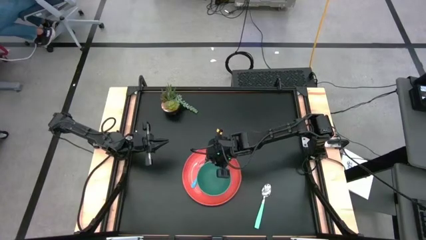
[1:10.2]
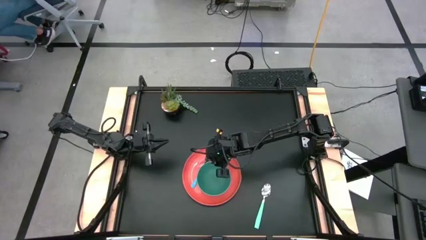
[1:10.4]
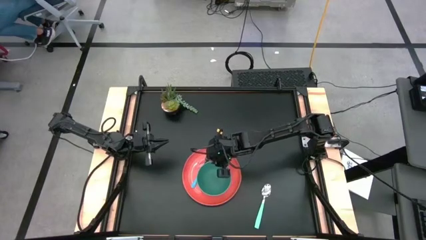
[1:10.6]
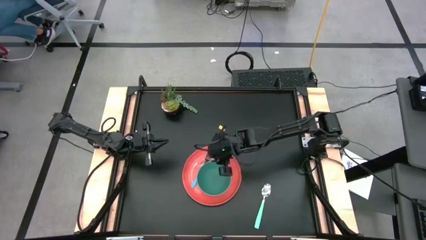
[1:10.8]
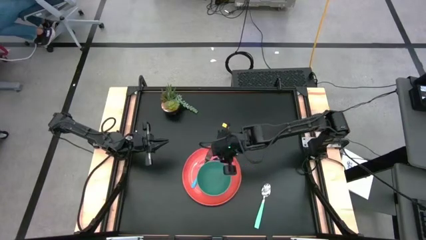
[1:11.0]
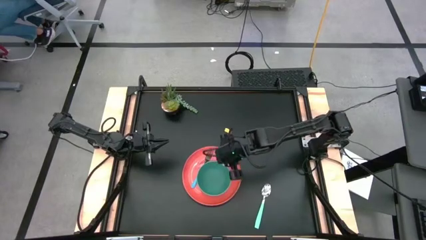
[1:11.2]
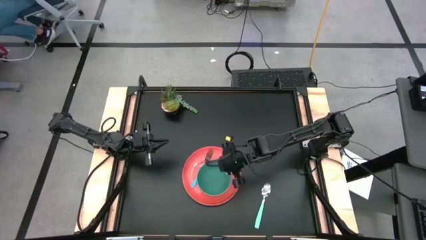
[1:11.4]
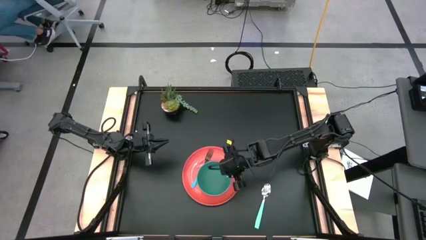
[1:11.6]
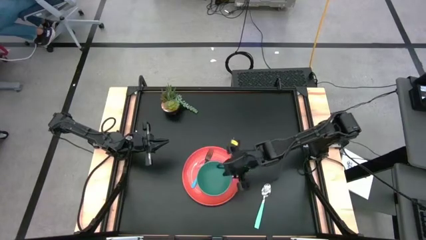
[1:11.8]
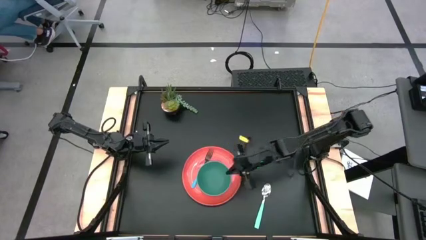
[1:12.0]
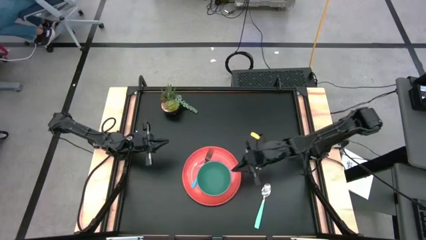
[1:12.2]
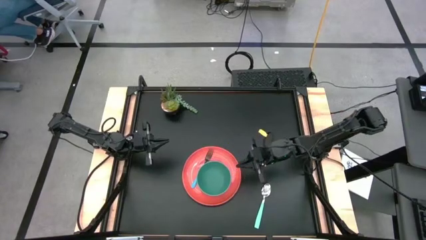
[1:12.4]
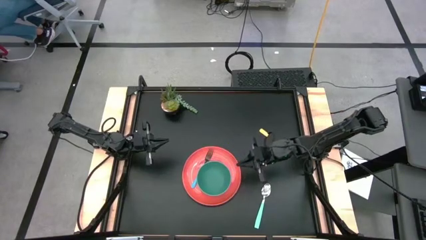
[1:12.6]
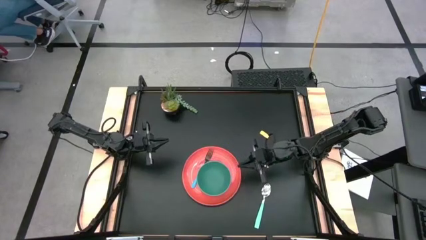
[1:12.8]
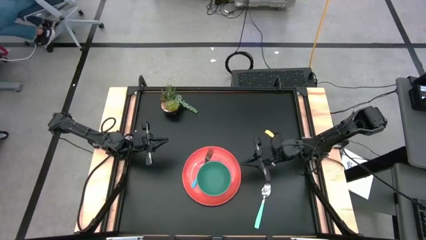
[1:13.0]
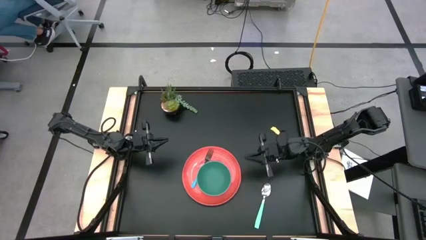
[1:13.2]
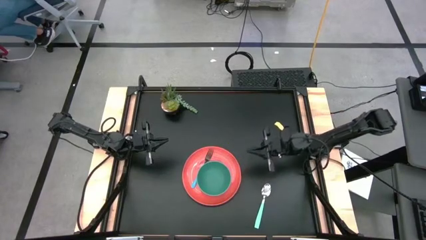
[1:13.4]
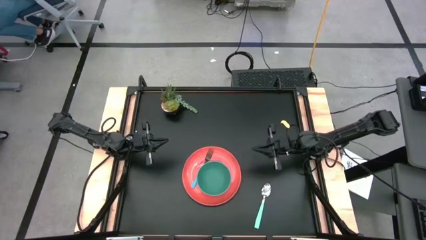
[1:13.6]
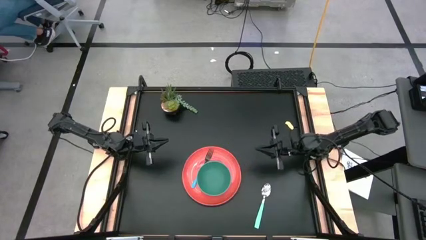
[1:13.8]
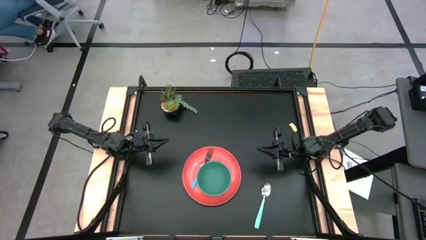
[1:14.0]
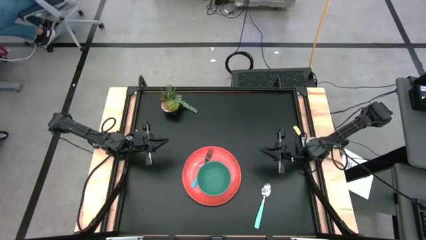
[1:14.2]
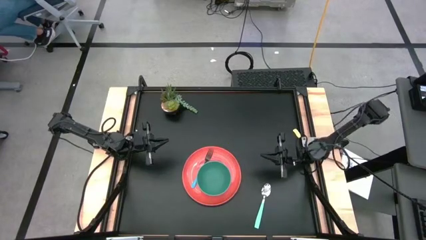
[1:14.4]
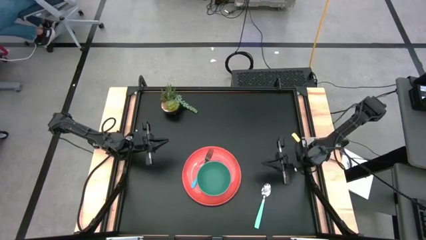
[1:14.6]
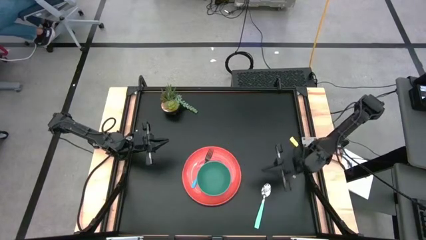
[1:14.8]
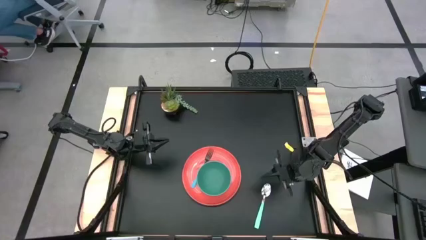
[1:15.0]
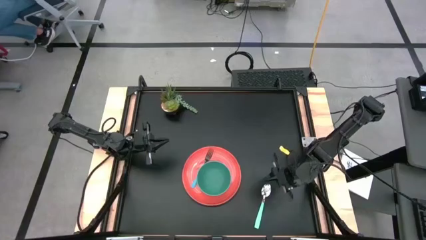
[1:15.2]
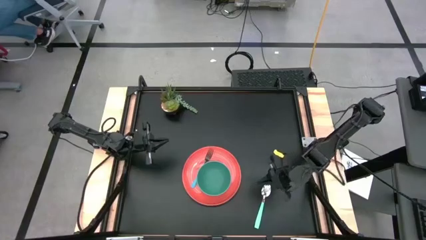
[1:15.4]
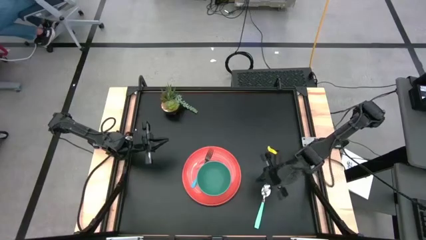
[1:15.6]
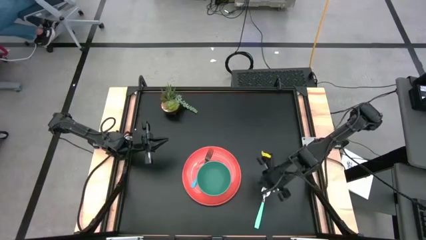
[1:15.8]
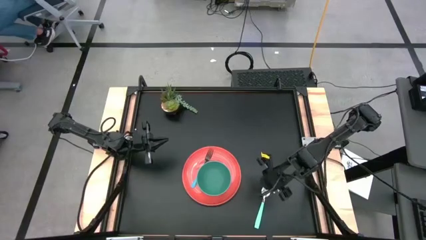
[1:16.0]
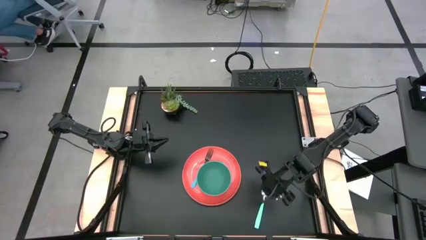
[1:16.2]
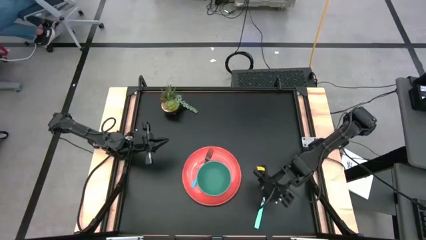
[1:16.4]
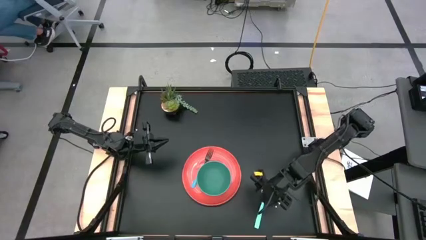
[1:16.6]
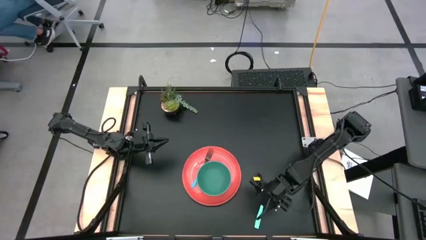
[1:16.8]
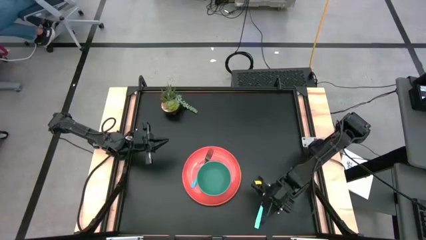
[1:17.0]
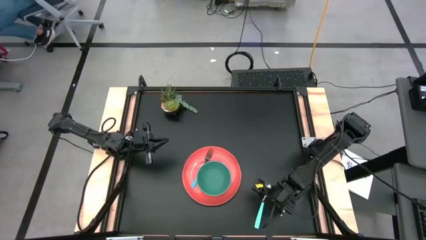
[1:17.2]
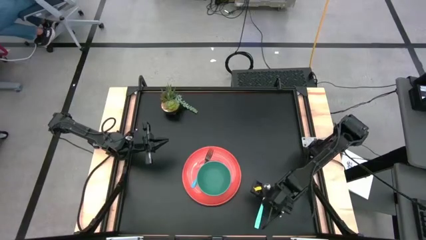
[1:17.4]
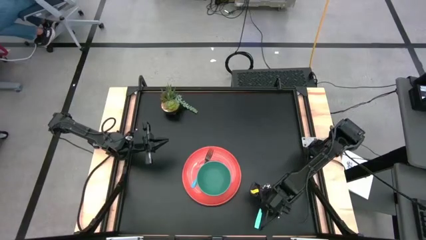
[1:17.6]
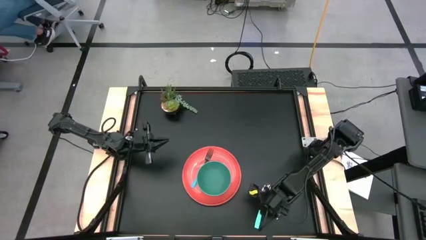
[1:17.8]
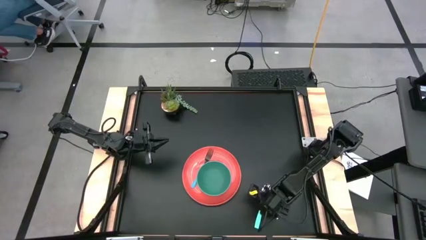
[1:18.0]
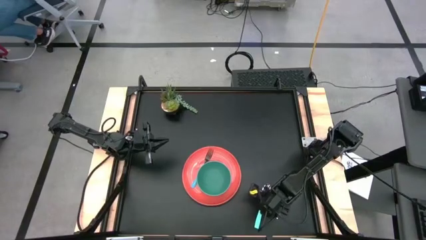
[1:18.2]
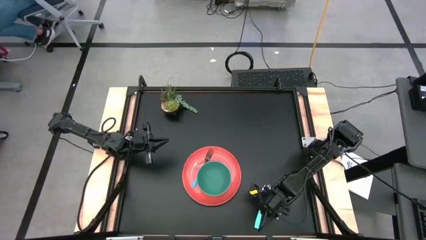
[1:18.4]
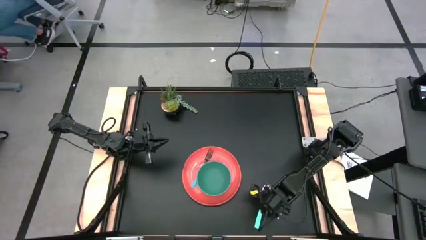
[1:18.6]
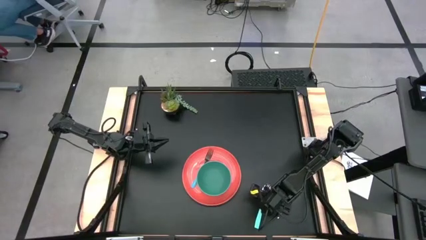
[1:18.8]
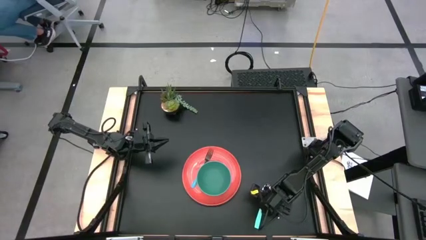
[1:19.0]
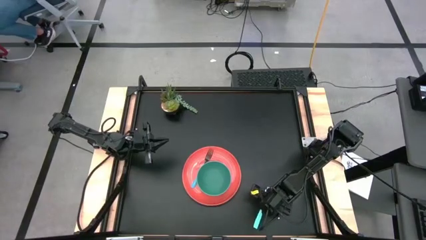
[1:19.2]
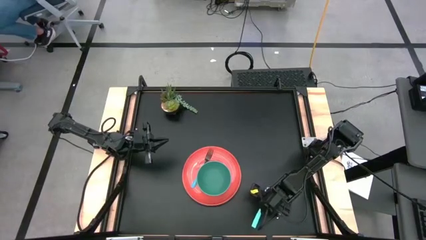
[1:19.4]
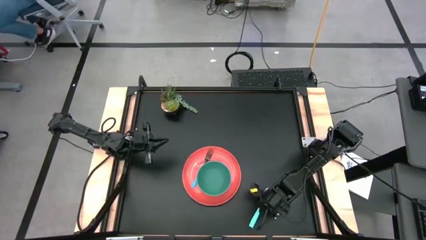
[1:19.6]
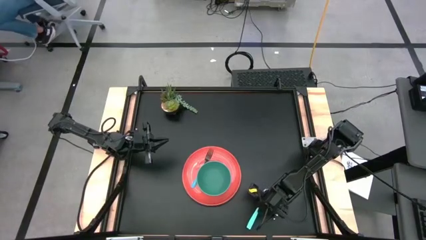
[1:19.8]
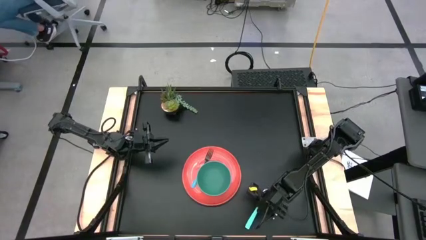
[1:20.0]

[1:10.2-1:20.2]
Task: Set table place
Put the blue spoon into the green bowl

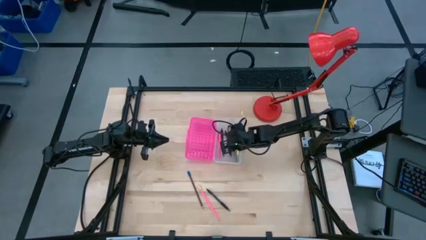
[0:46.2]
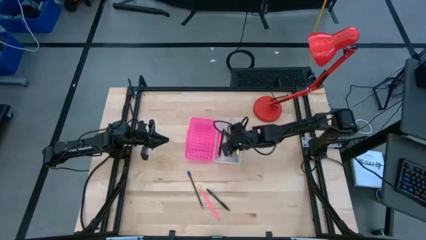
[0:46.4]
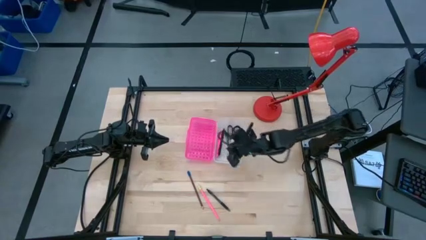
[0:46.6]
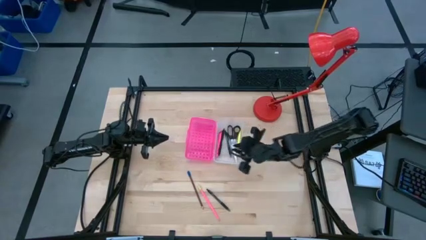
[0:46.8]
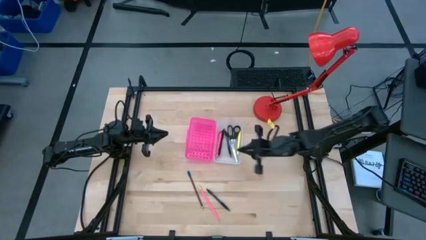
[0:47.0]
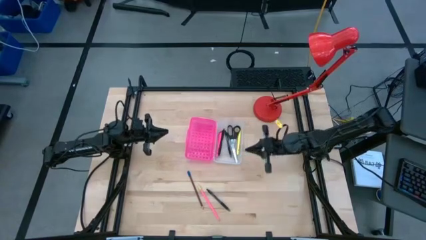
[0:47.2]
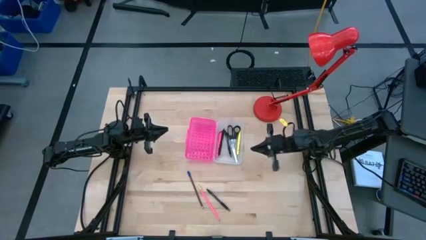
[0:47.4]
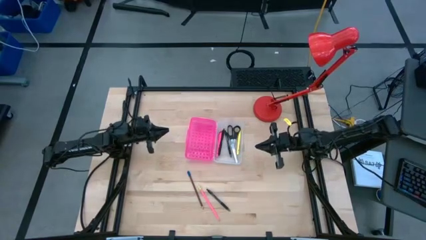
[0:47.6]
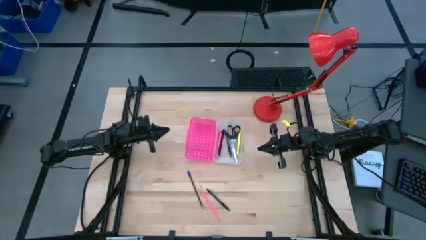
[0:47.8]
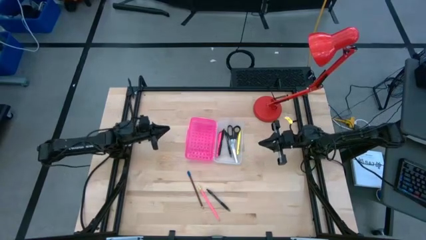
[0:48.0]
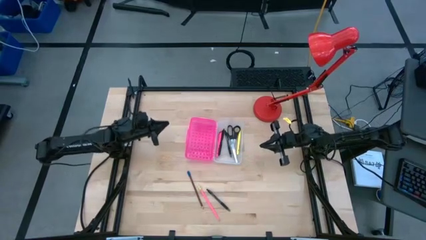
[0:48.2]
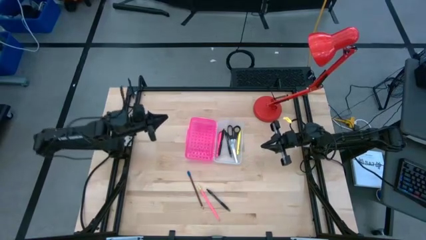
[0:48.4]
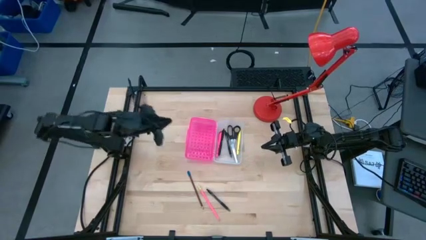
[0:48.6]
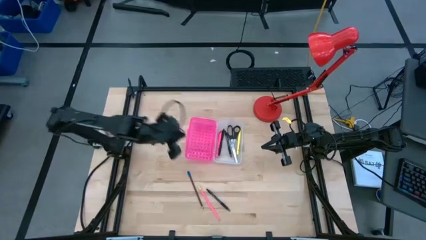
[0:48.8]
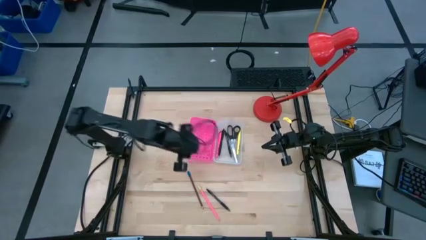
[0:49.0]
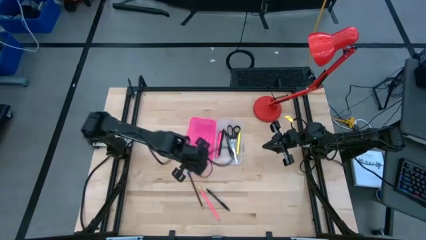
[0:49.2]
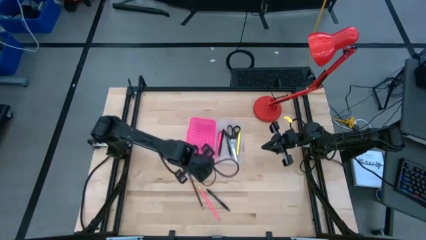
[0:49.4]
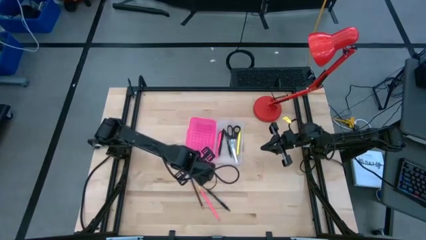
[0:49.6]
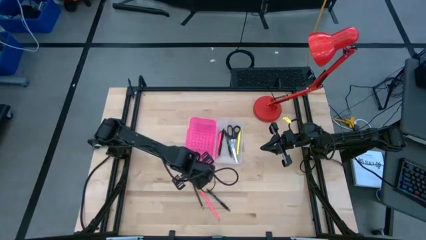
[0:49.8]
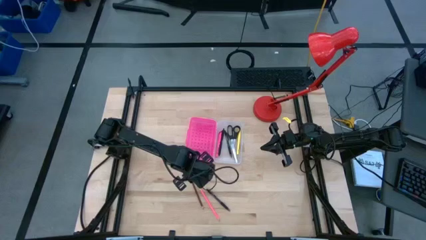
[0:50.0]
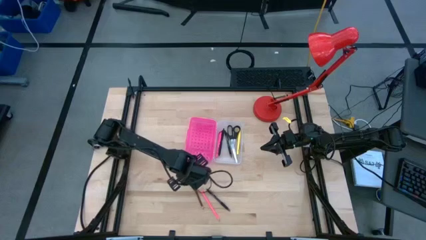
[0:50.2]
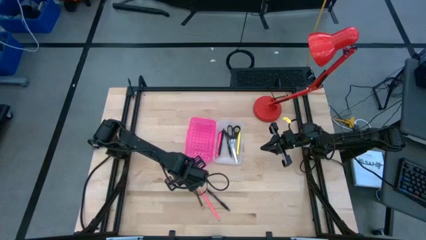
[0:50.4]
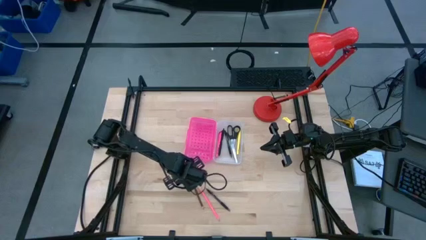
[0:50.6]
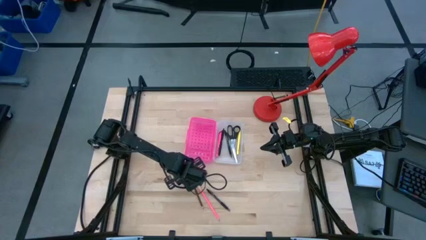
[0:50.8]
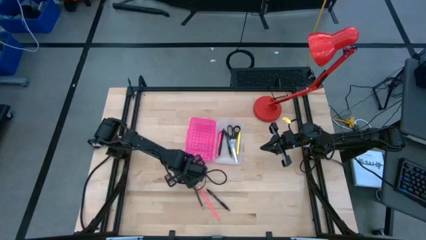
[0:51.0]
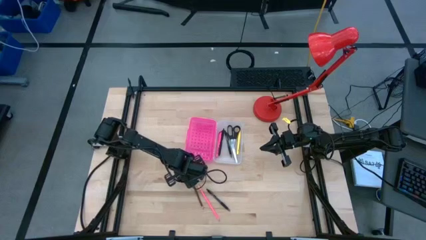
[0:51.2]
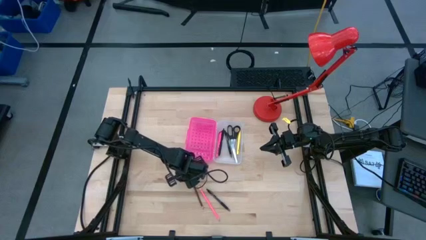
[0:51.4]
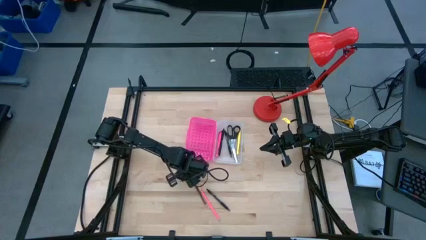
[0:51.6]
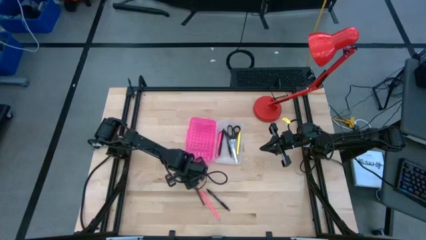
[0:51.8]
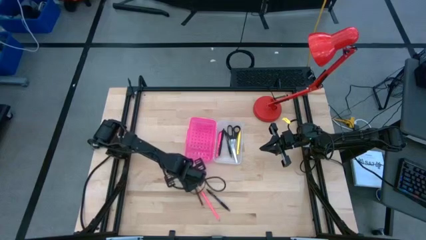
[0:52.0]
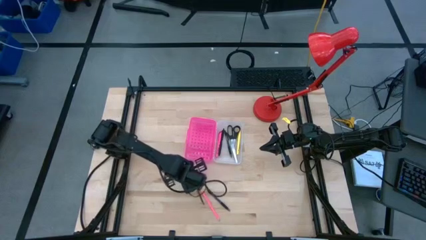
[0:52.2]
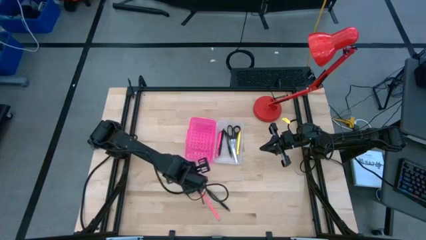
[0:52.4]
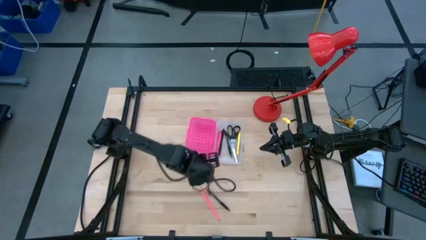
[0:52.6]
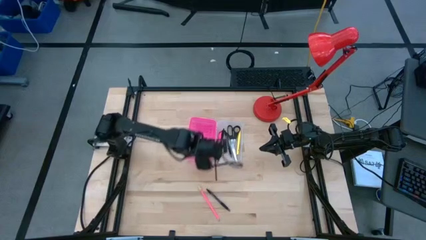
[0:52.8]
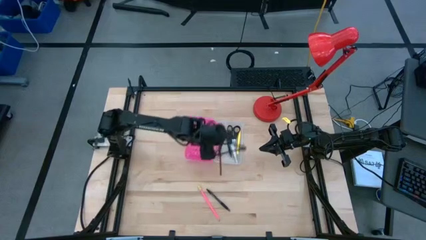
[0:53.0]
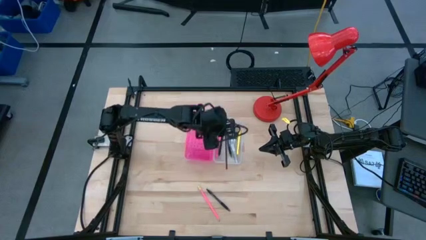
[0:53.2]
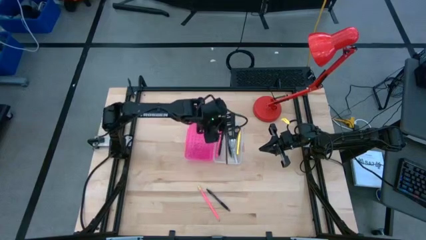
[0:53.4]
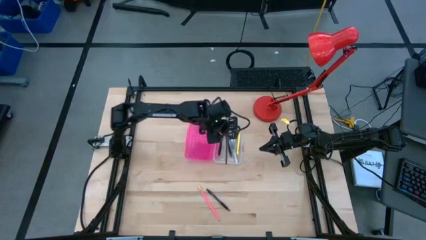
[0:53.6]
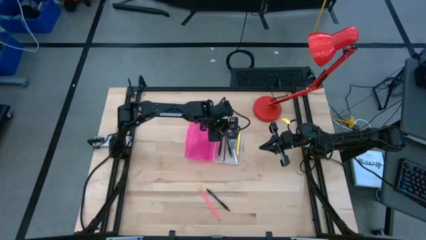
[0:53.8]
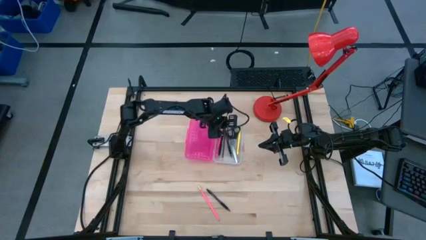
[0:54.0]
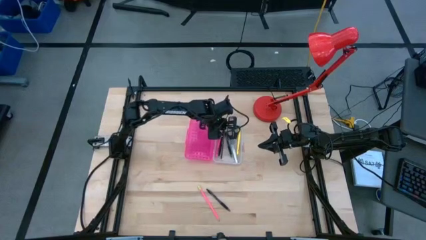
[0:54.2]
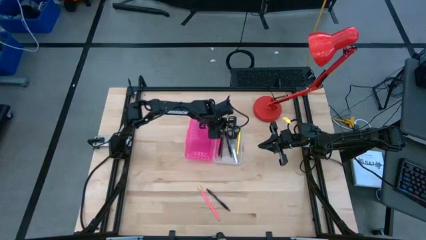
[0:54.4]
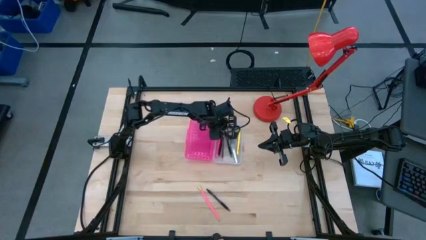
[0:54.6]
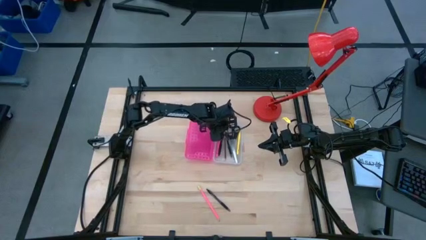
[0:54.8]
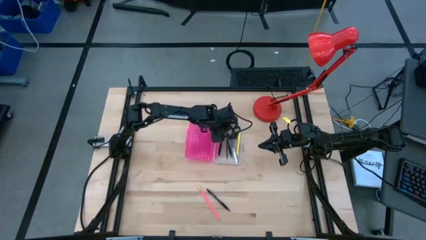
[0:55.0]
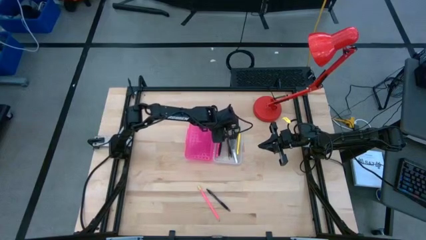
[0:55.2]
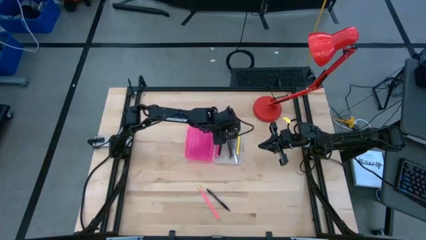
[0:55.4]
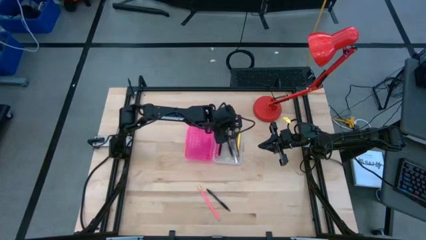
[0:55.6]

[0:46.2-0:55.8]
Task: Pick & place school supplies into a supply box
Put the brown pencil into the supply box
